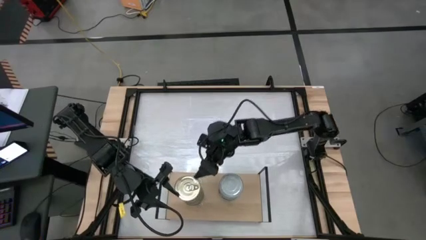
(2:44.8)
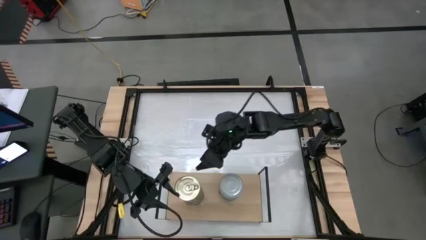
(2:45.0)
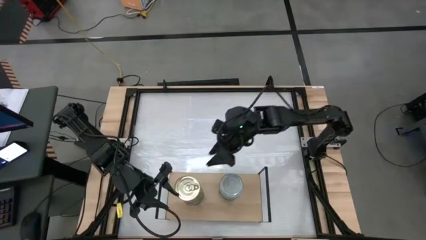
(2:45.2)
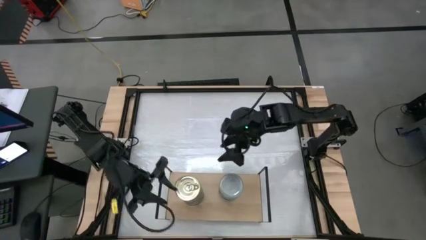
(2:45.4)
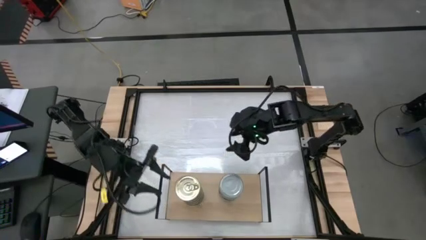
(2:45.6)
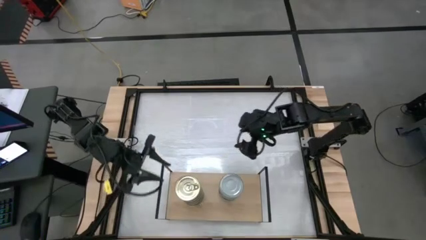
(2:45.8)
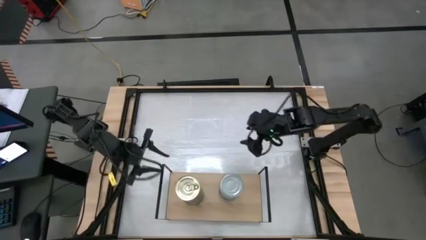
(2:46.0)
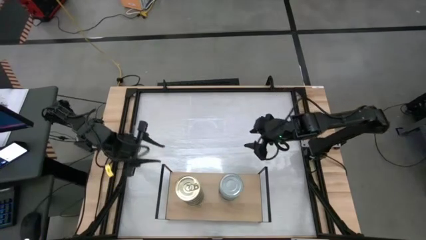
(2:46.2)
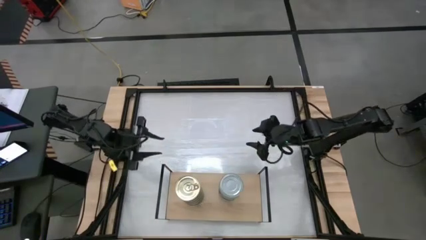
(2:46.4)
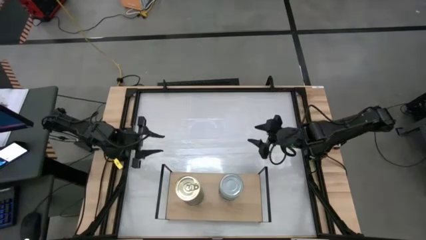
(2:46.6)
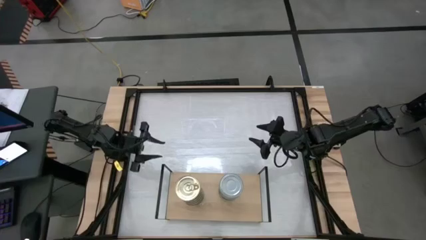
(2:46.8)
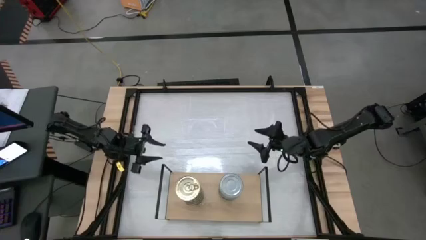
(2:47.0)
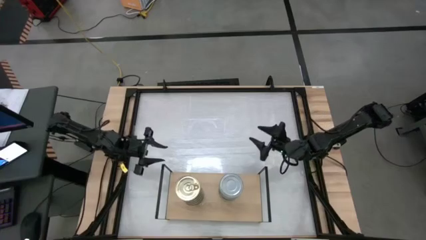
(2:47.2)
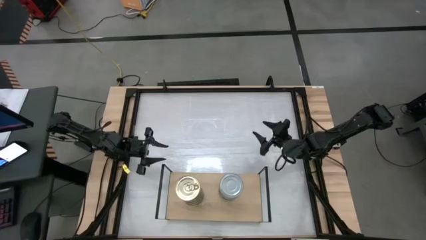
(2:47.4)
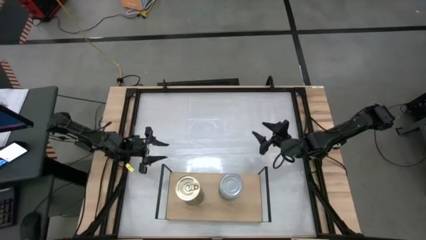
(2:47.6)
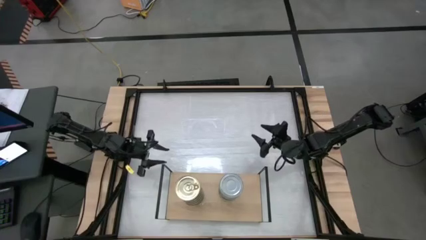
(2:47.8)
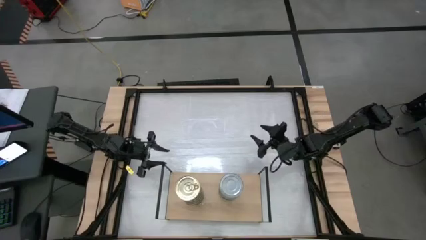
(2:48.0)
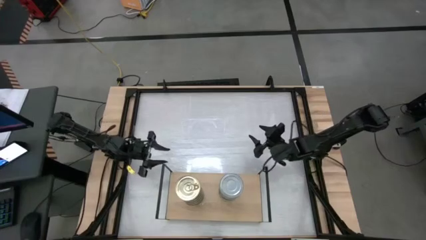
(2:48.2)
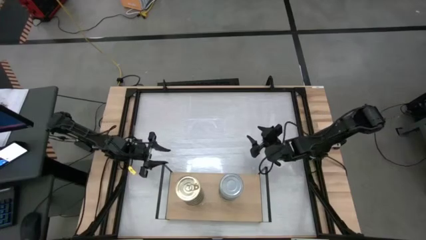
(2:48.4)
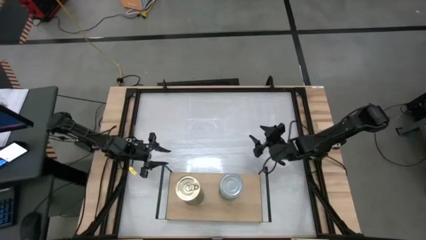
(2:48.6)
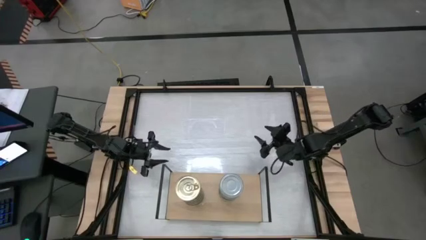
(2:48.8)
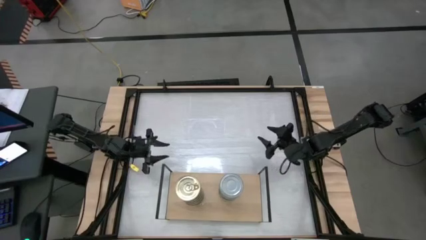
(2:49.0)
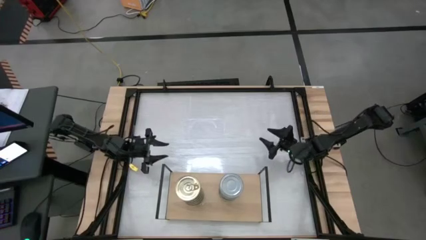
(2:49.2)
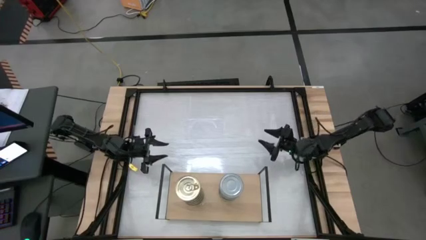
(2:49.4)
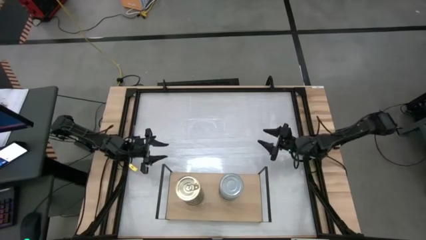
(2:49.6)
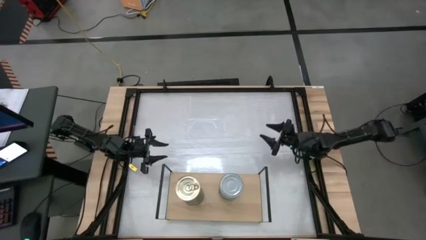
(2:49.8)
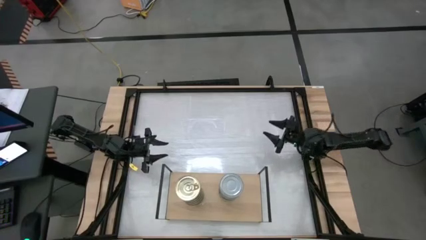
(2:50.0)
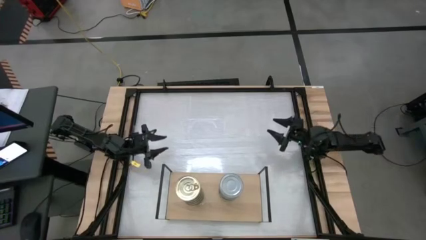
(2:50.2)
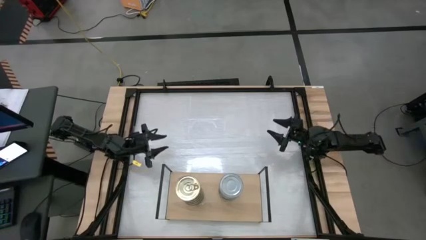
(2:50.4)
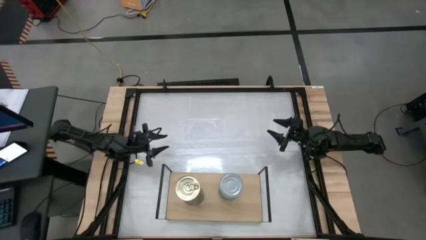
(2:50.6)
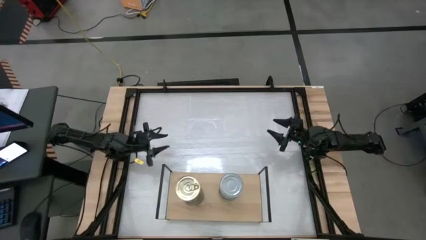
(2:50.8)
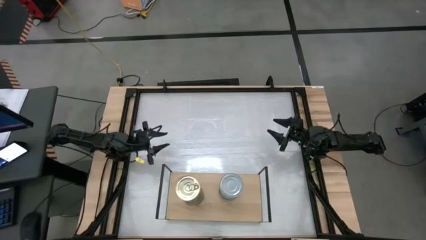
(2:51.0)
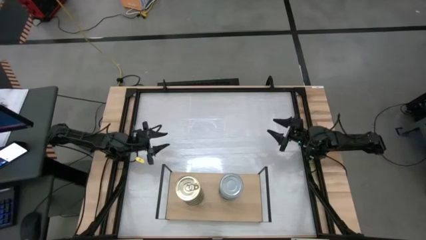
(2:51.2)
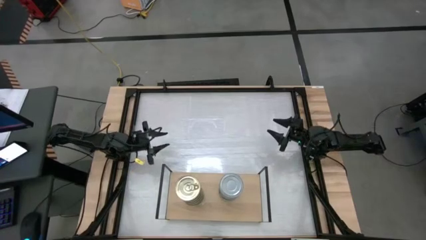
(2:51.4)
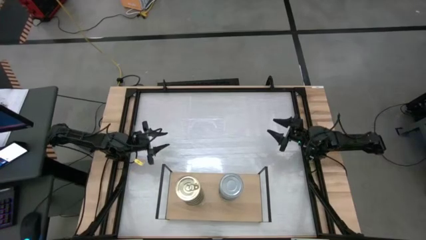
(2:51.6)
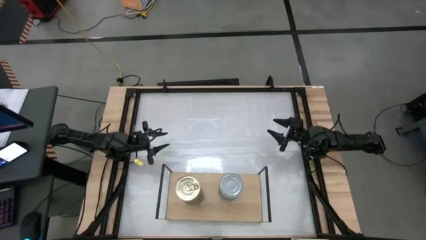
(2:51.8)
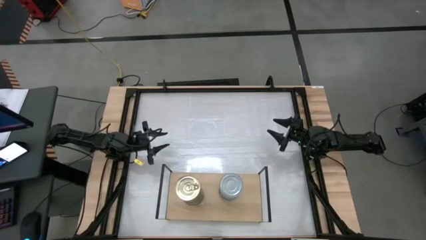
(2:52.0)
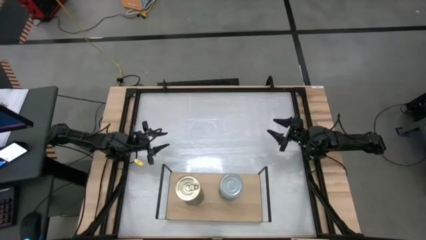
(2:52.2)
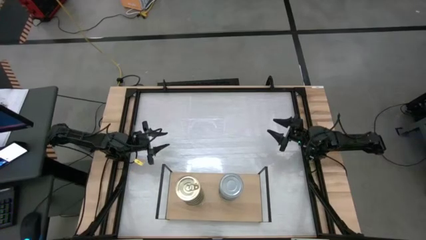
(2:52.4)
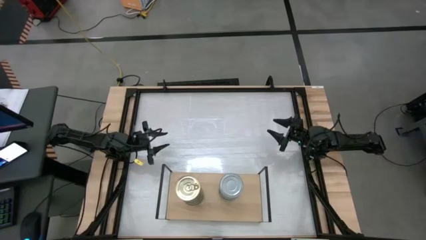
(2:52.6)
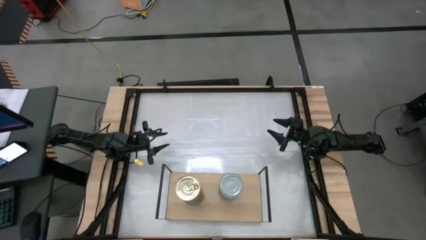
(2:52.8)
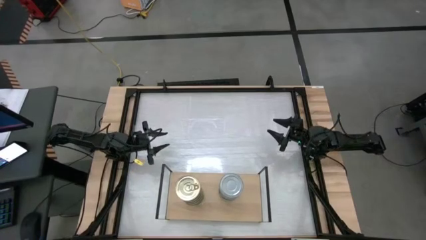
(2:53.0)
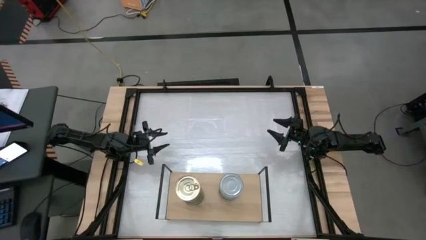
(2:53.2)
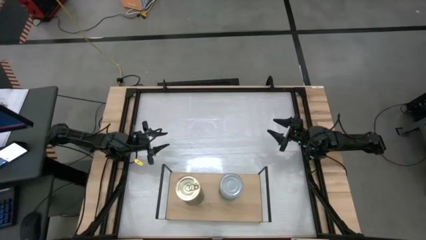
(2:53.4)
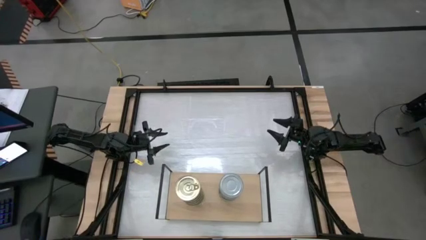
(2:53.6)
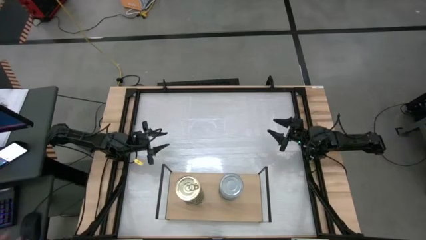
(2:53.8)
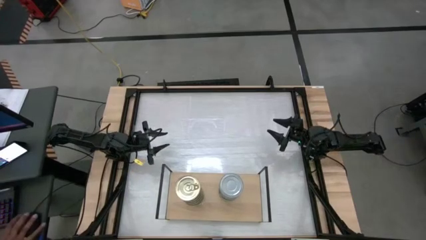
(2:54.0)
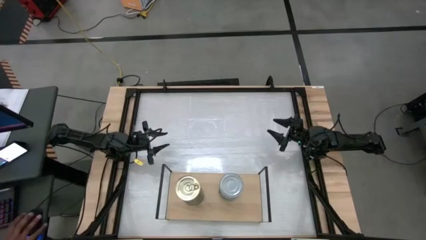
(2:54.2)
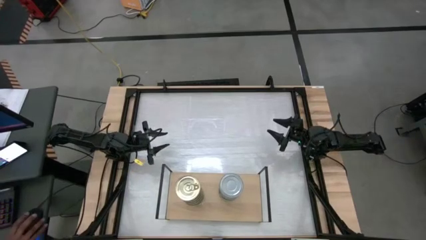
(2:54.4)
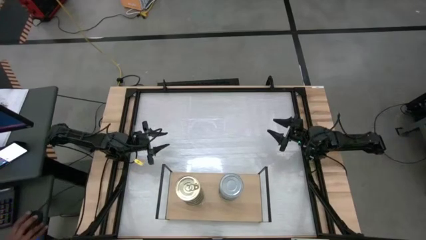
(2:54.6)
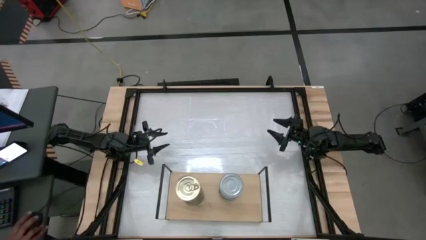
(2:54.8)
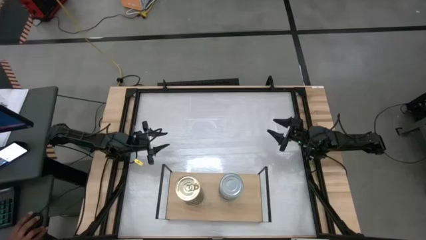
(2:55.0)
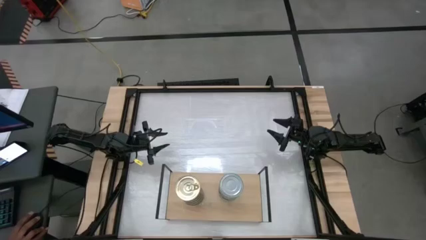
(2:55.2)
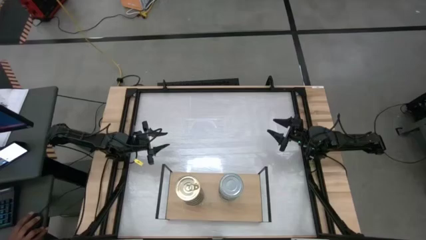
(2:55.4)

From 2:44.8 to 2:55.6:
Task: Stack canned seafood by type on shelf
Return to Home Position

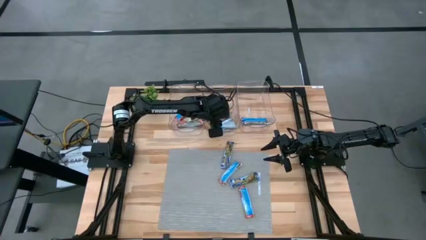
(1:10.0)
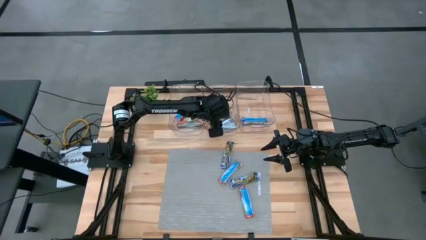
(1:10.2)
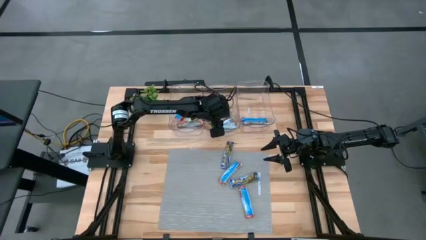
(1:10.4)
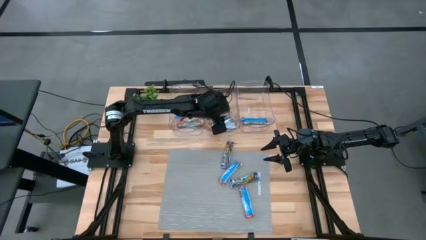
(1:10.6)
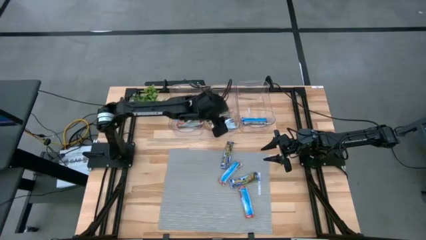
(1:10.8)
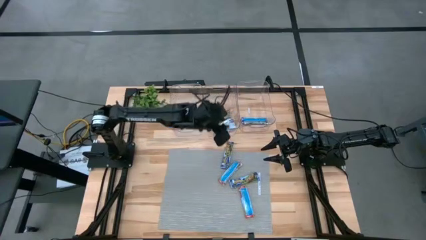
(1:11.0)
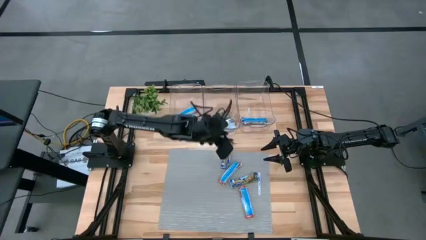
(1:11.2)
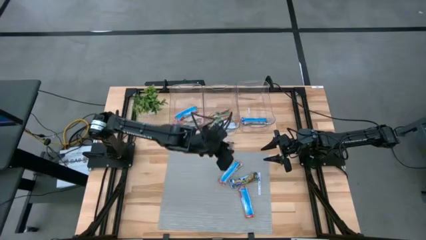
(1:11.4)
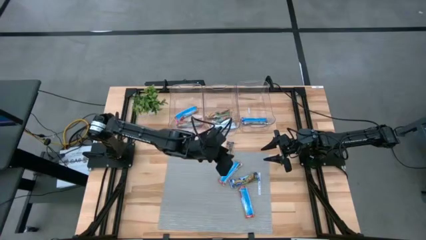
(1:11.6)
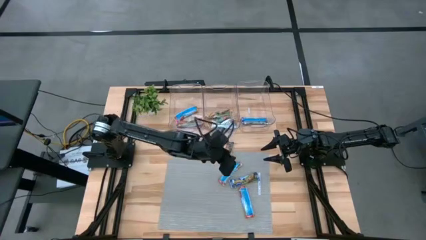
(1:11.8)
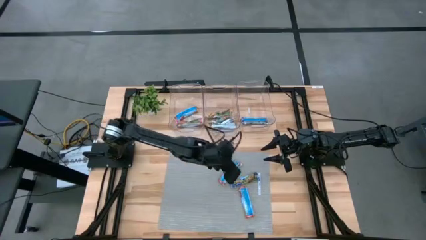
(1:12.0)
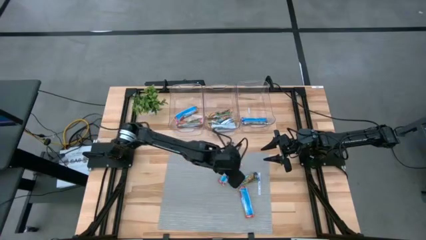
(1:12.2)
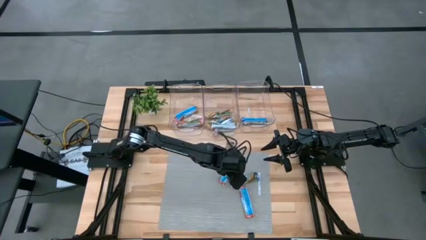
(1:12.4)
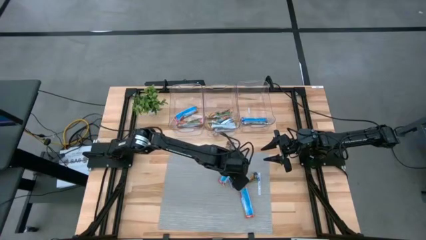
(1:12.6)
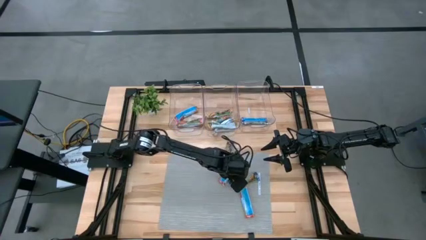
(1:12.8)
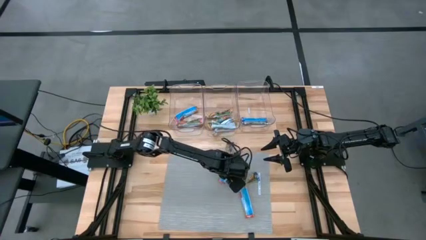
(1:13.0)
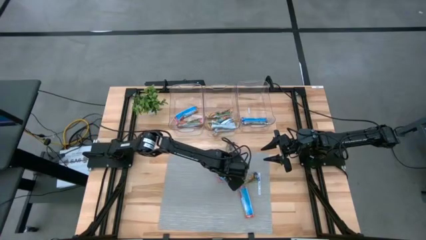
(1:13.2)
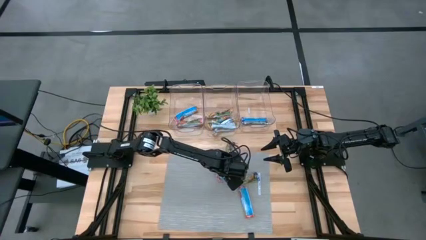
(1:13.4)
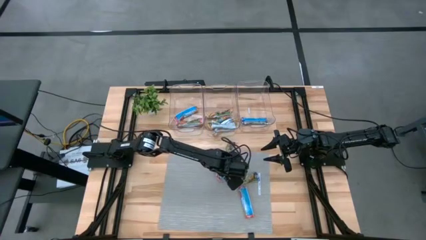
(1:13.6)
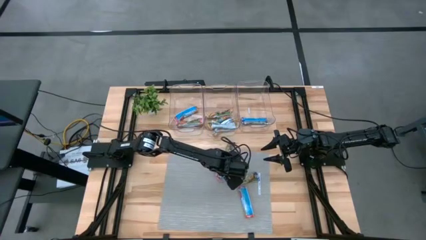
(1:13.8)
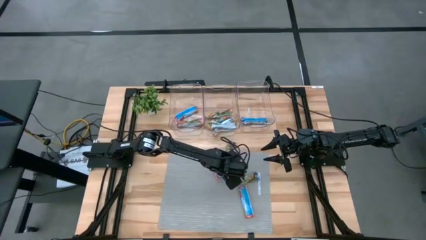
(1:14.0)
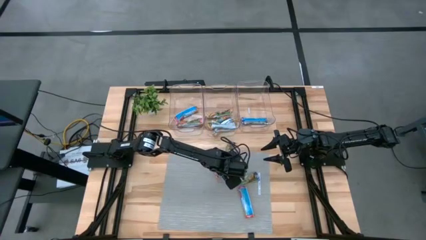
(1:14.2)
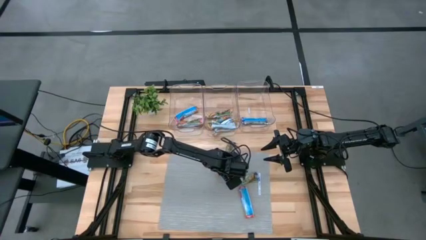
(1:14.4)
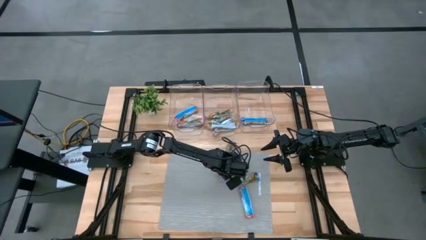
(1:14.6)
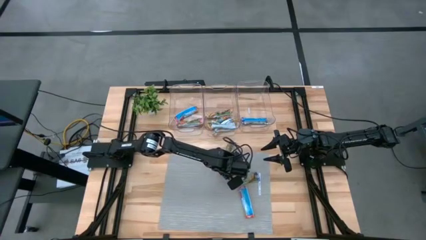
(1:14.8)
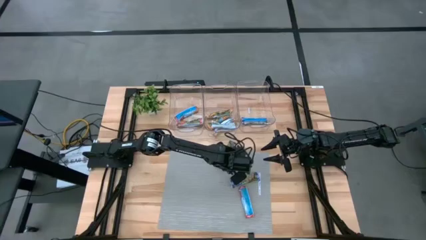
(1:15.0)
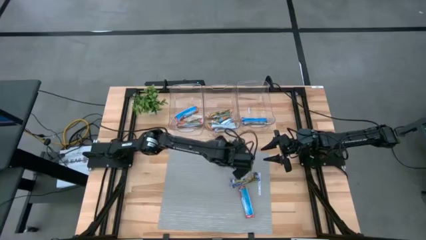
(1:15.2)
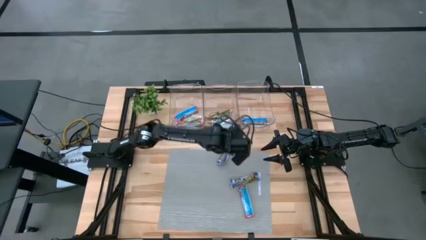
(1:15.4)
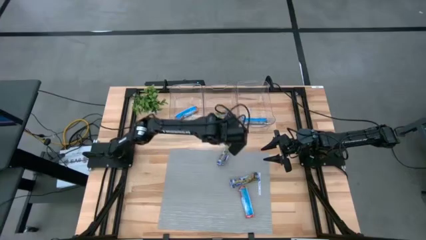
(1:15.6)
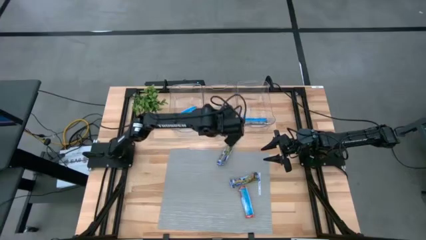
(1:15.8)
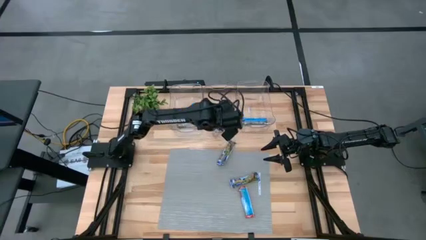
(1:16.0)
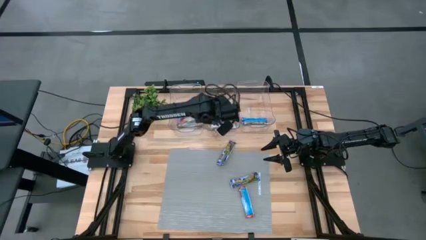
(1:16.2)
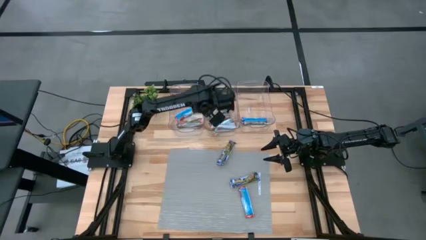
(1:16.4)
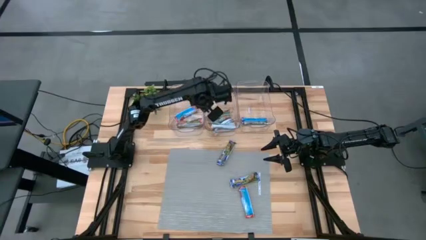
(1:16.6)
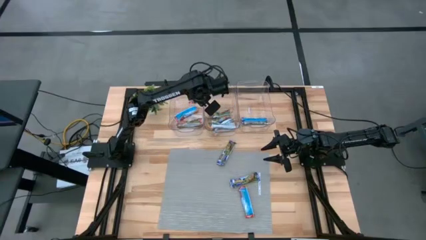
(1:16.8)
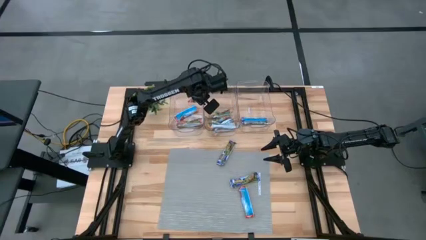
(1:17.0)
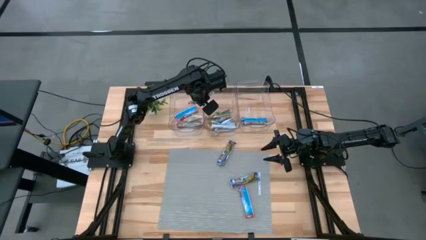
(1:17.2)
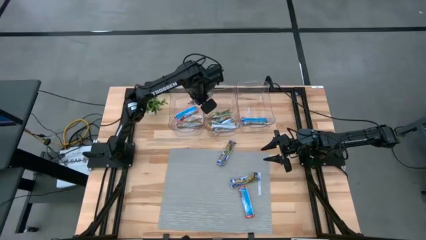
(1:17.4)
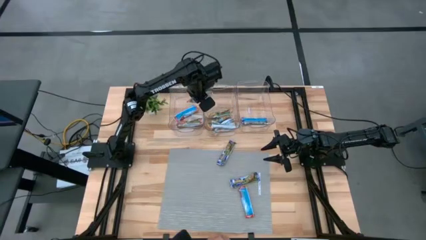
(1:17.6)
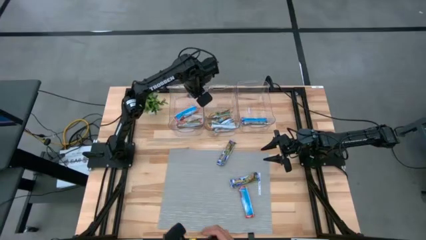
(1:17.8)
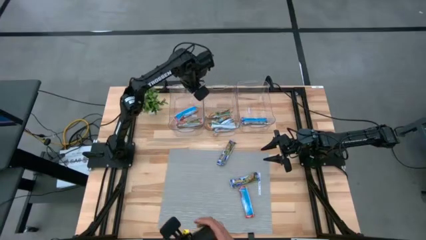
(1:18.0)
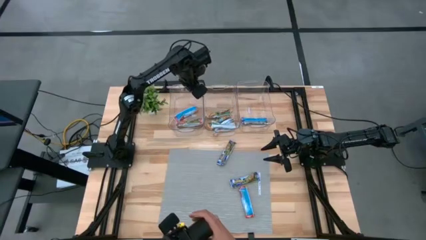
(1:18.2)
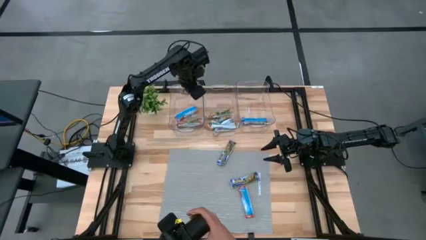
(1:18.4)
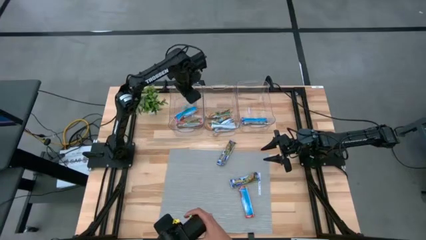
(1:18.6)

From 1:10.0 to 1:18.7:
Task: Pick and place Granola Bars by type
Put the red granola bar into the left transparent bin
